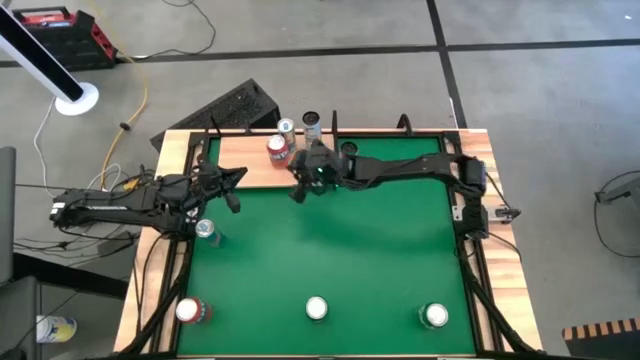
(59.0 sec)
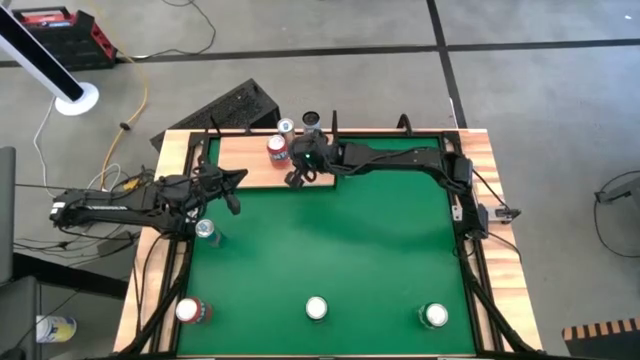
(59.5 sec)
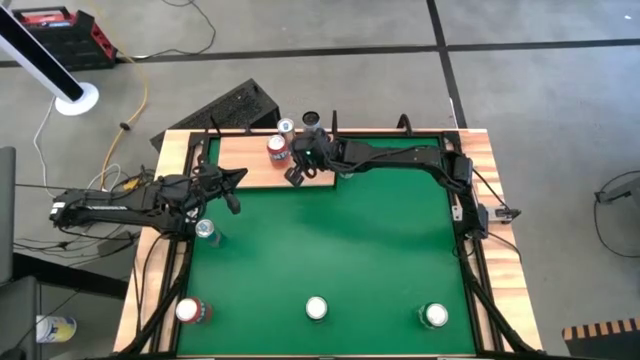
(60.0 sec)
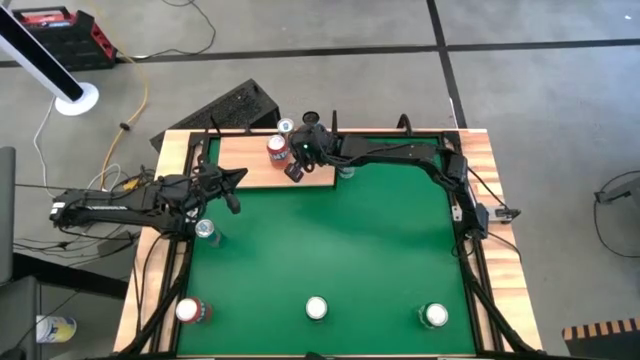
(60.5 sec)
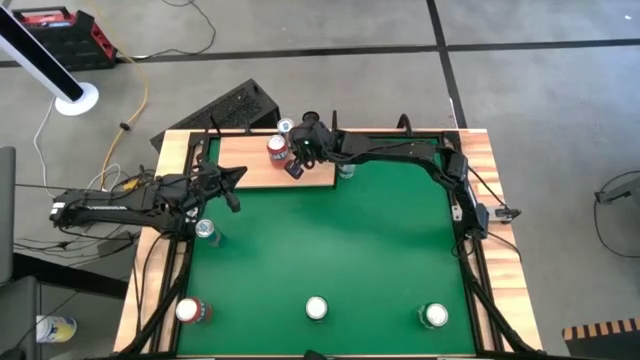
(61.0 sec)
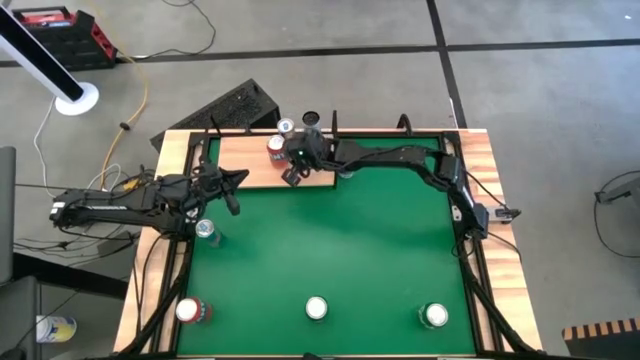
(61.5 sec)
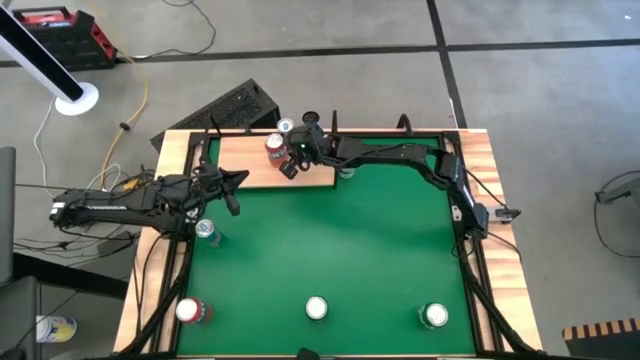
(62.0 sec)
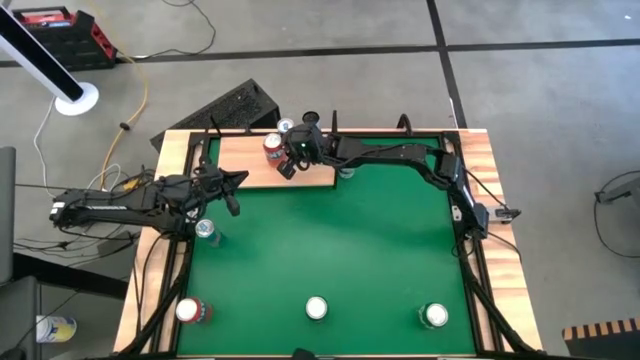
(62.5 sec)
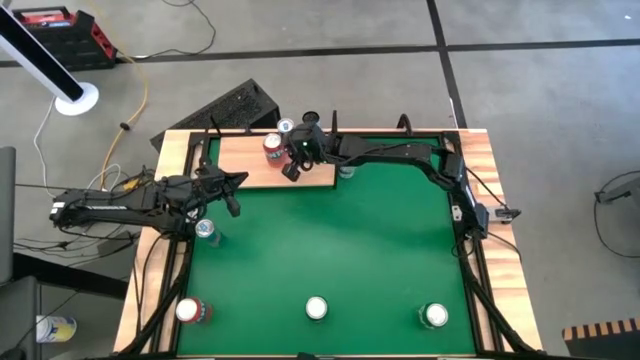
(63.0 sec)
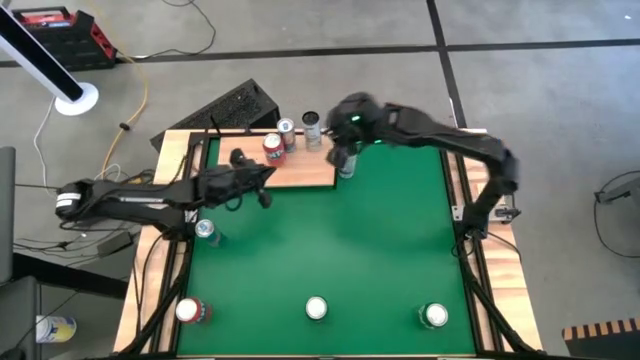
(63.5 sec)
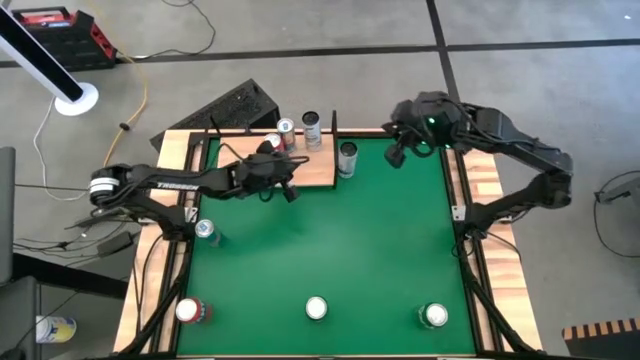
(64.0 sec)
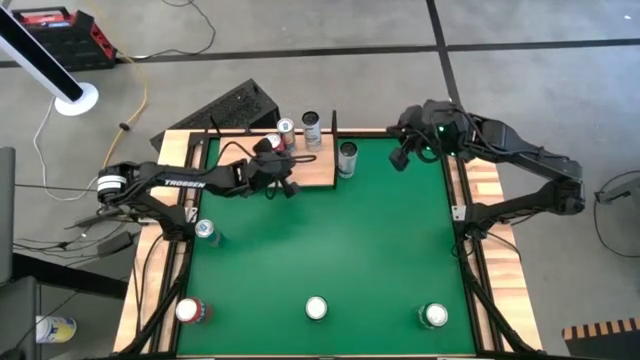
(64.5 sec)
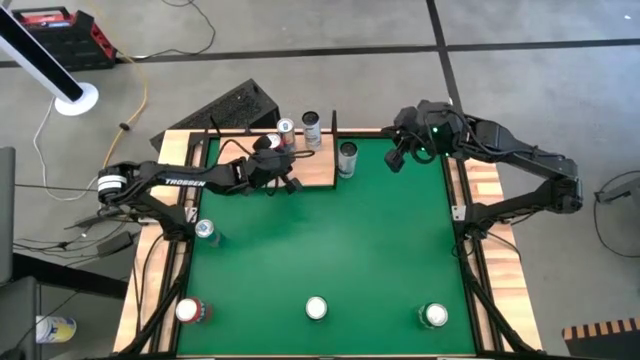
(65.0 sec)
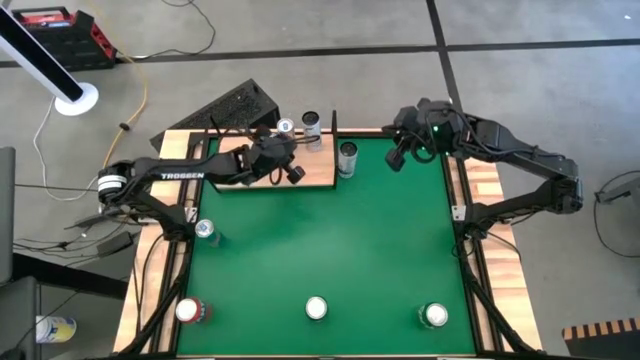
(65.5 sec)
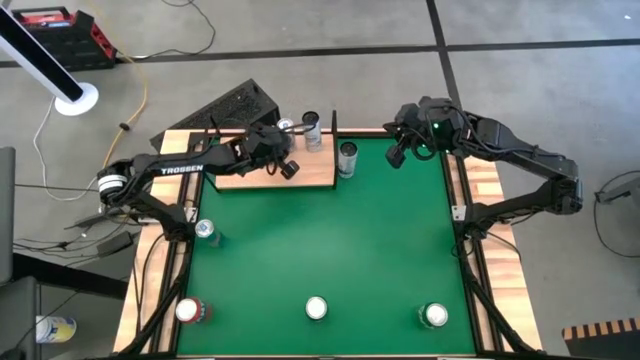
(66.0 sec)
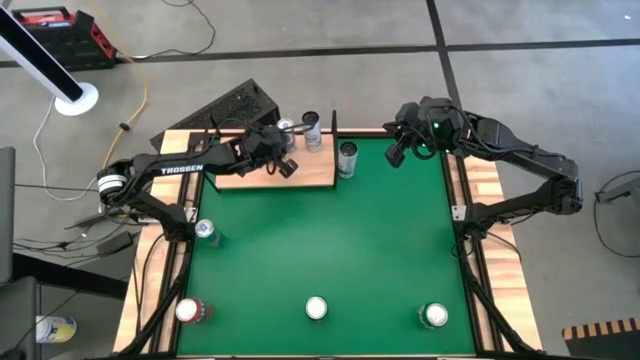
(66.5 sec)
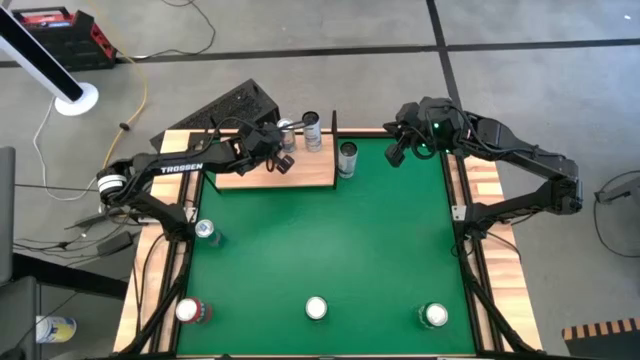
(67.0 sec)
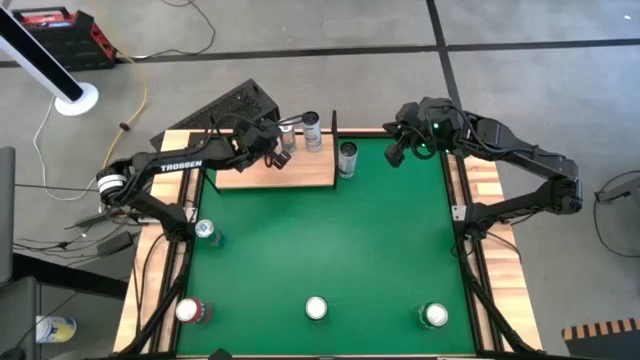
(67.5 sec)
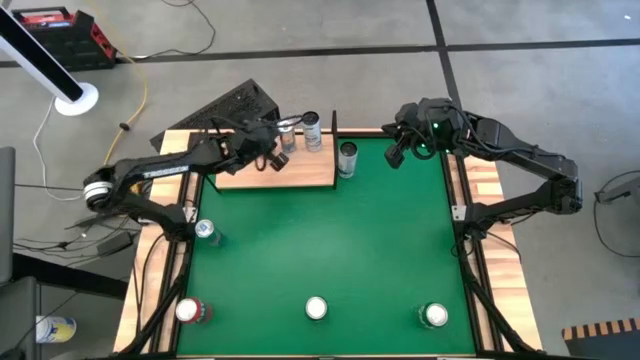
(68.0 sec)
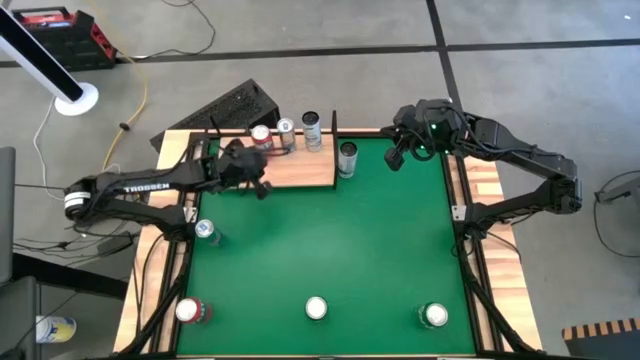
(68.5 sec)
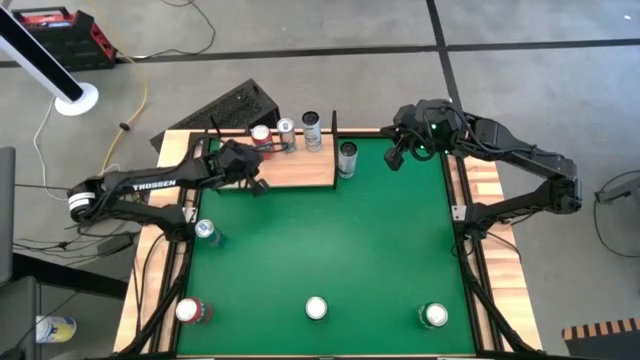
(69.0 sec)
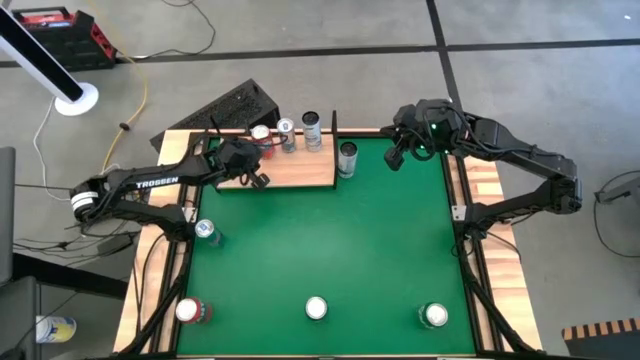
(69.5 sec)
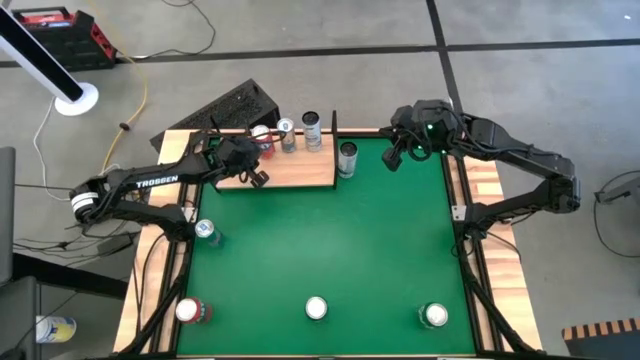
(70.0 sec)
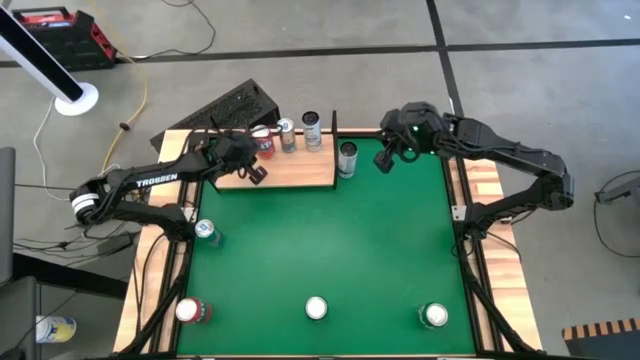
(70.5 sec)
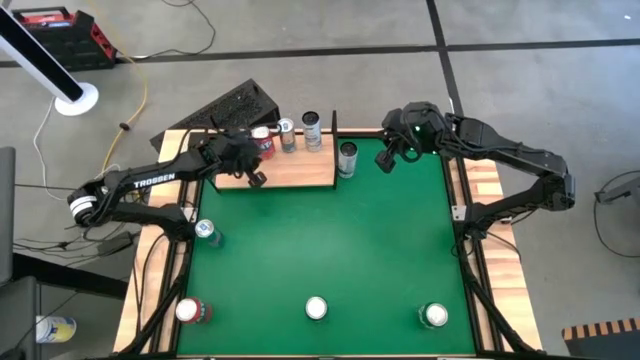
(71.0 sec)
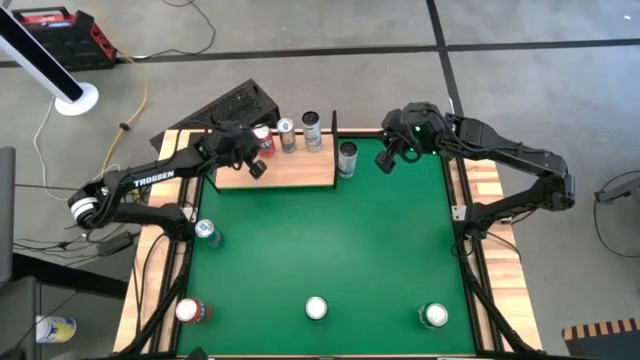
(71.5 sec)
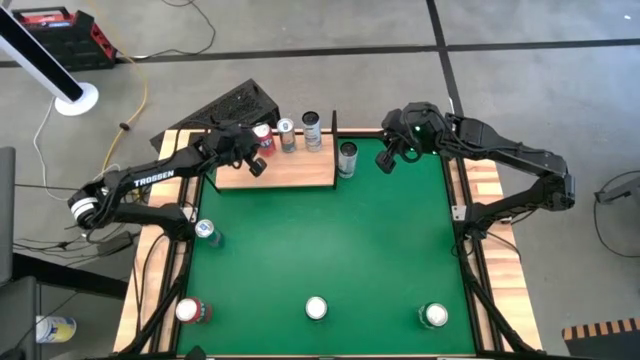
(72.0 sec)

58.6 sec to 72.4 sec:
Task: Place canned beverage on shelf
Put the top red soda can on the shelf

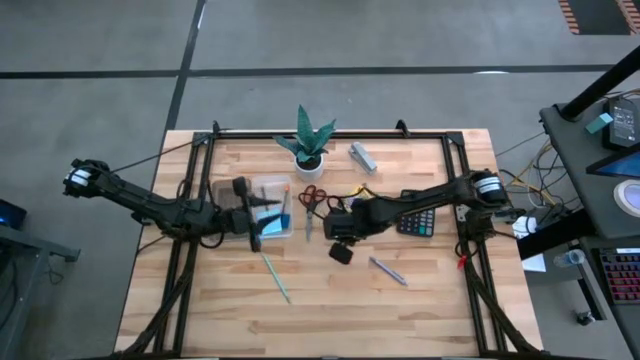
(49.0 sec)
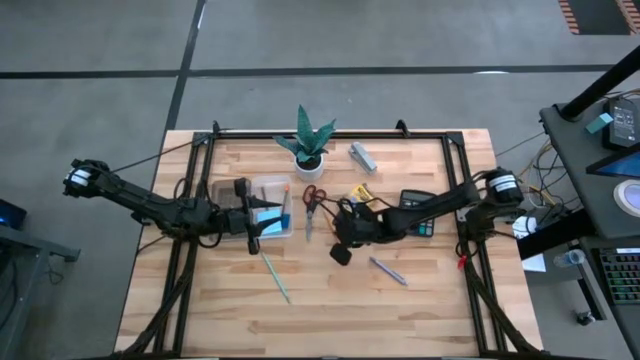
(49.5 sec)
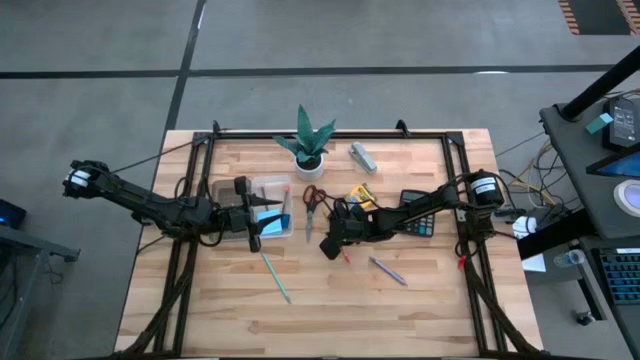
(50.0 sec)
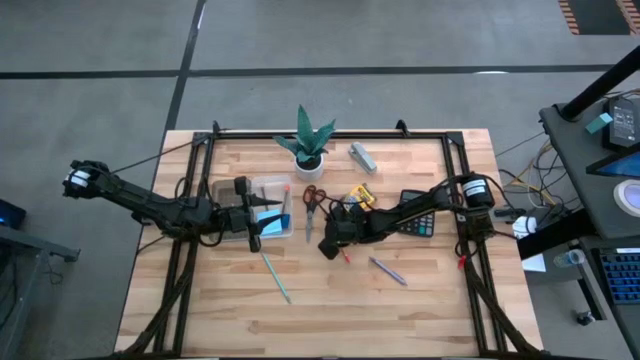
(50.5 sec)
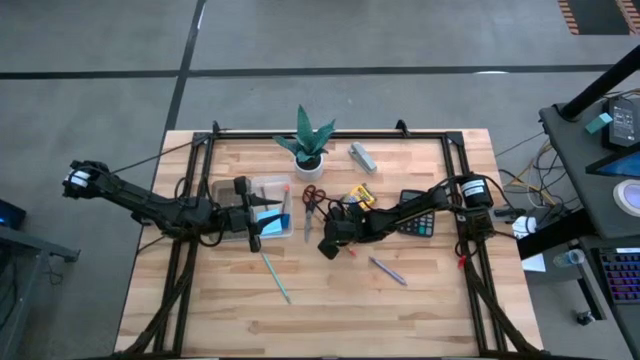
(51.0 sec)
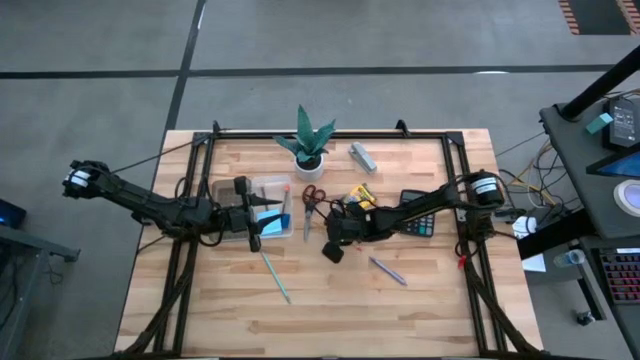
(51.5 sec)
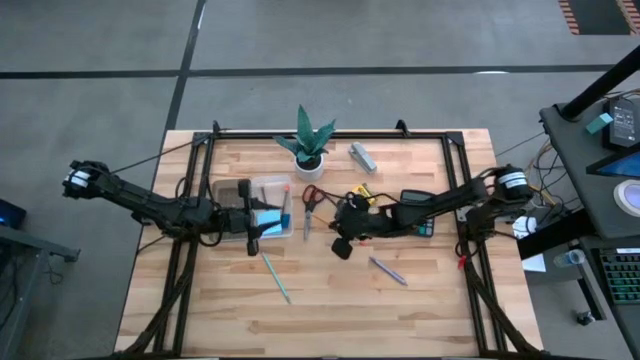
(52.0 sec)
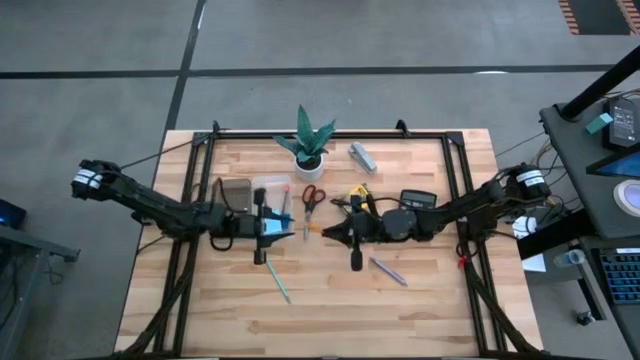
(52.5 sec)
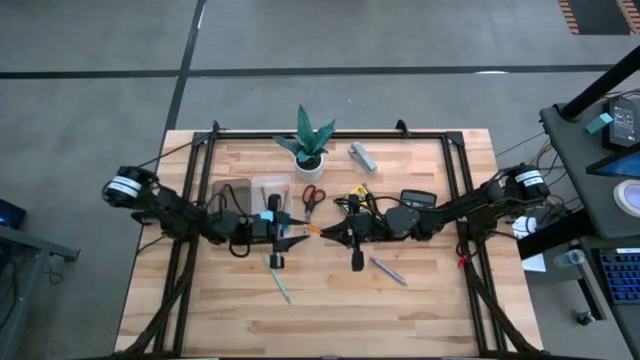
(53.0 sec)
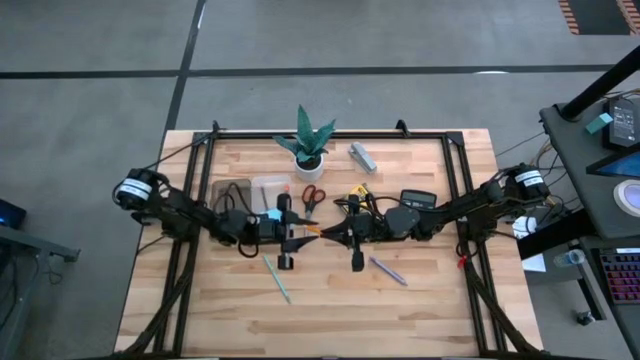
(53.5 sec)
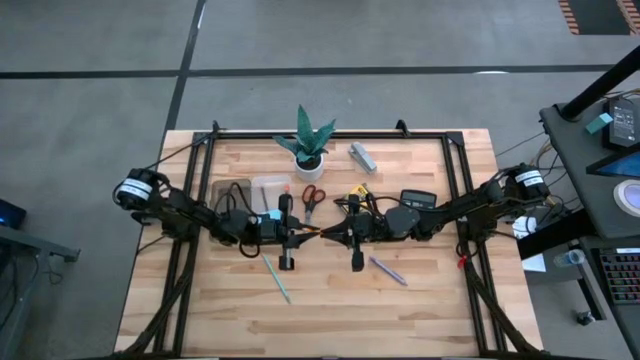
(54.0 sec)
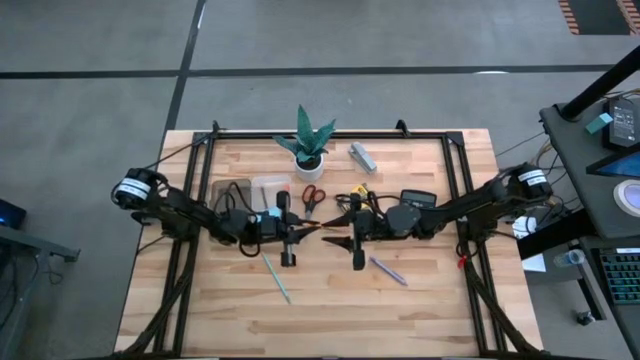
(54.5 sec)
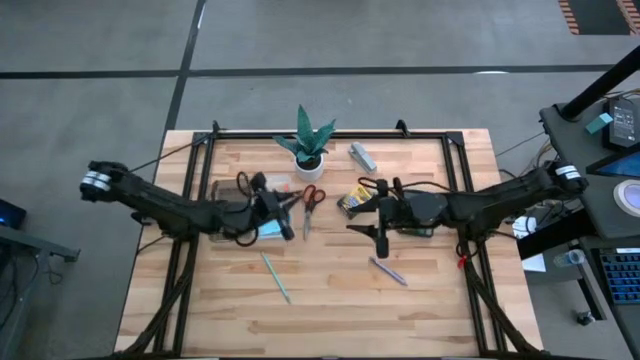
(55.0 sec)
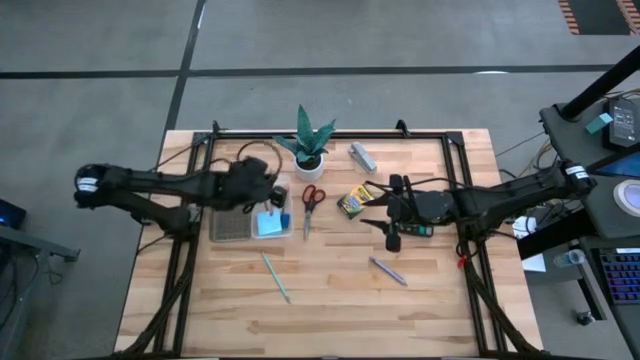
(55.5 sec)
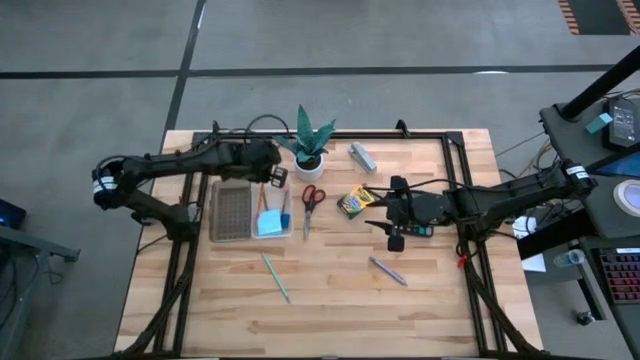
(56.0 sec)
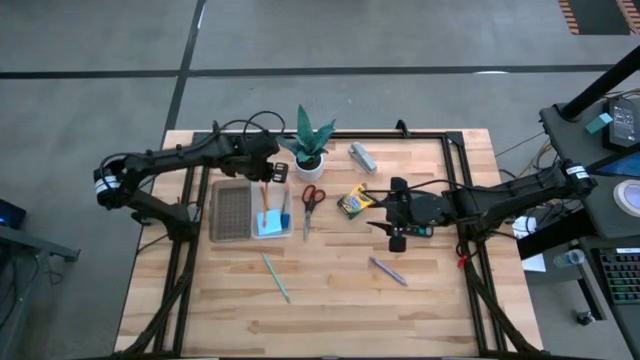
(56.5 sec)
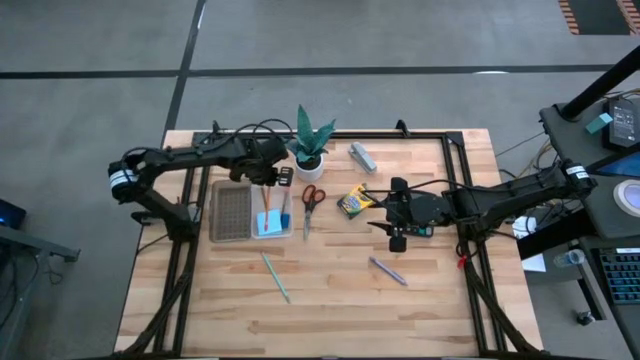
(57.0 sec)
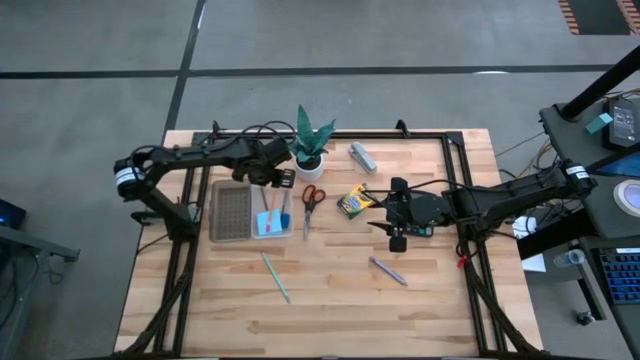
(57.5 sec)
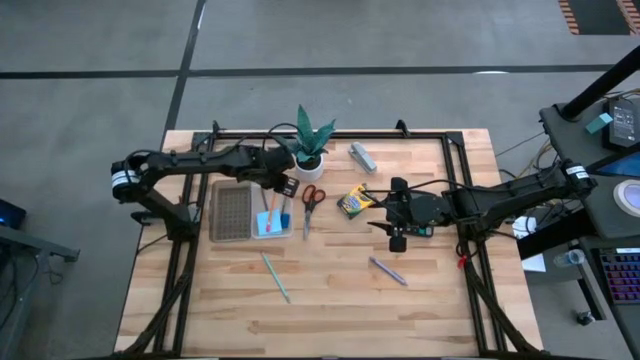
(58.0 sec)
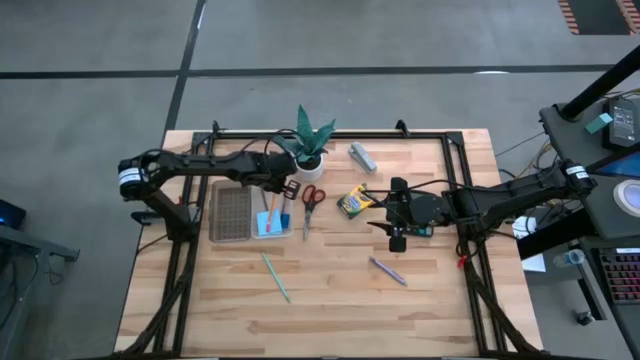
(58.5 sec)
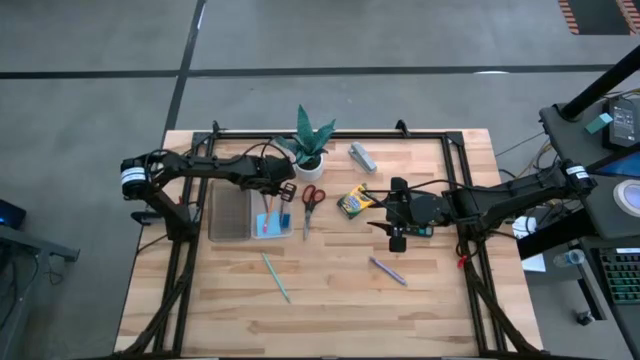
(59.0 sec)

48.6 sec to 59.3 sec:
Task: Pack school essentials
Put the orange pencil into the white and black box
